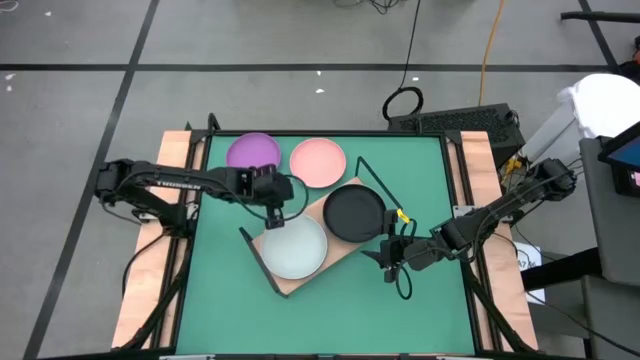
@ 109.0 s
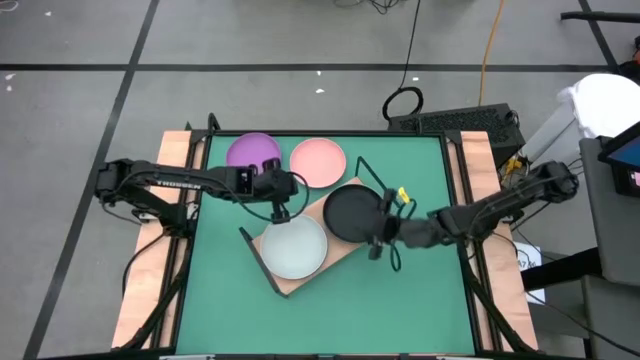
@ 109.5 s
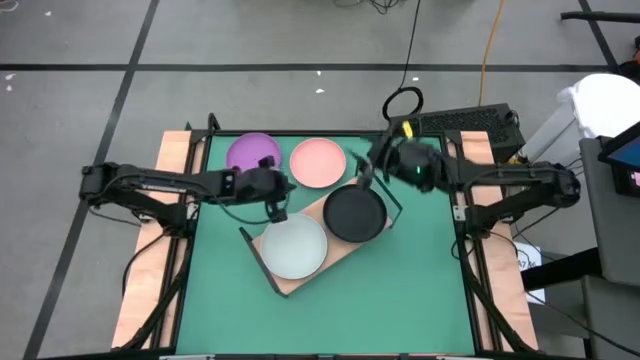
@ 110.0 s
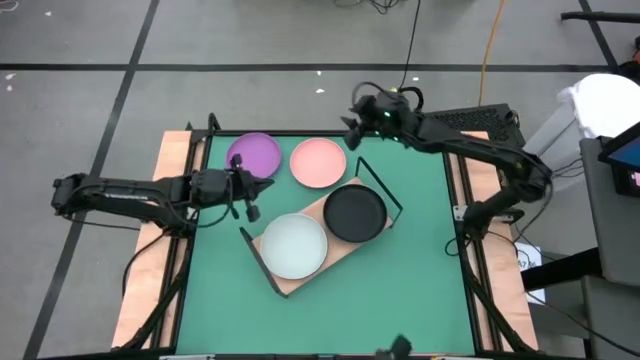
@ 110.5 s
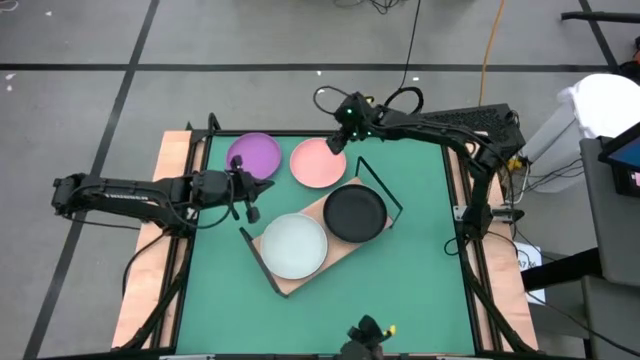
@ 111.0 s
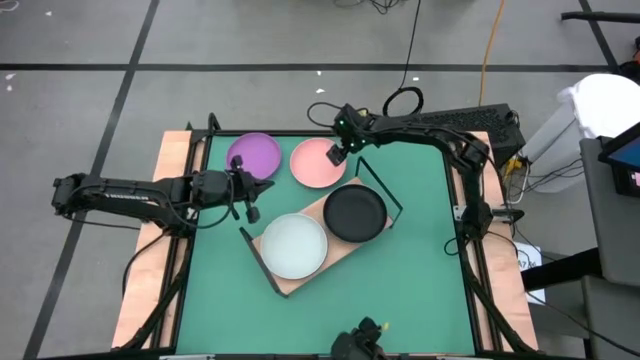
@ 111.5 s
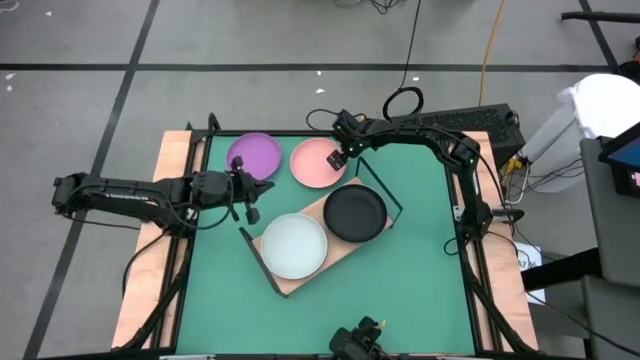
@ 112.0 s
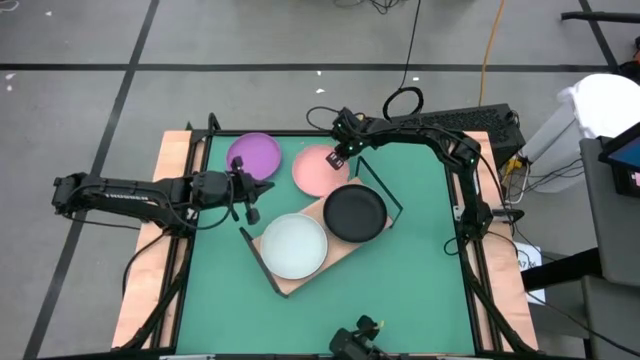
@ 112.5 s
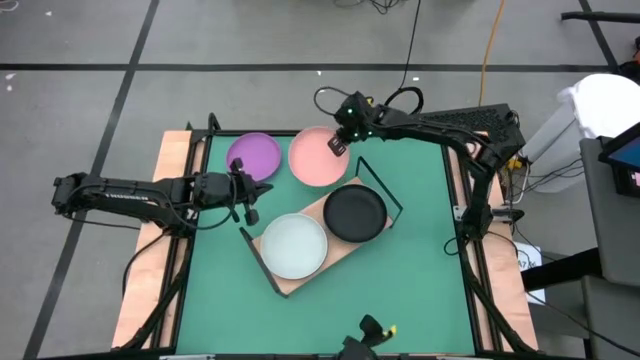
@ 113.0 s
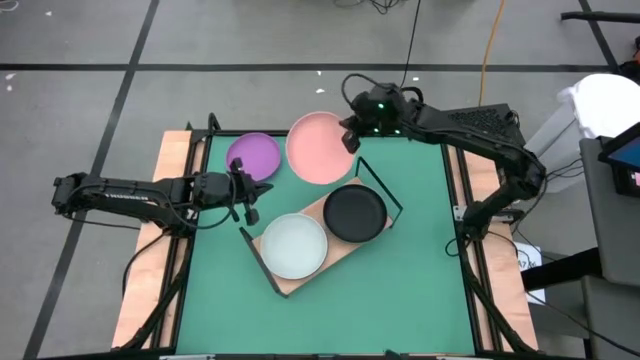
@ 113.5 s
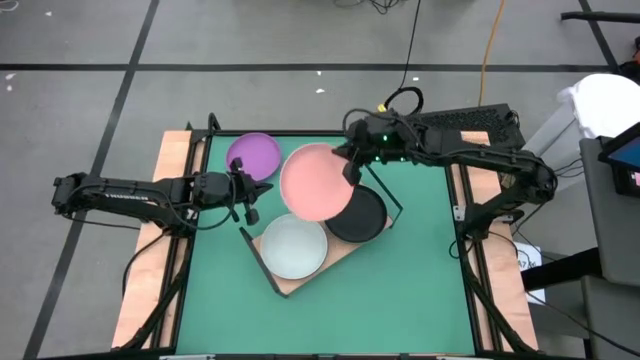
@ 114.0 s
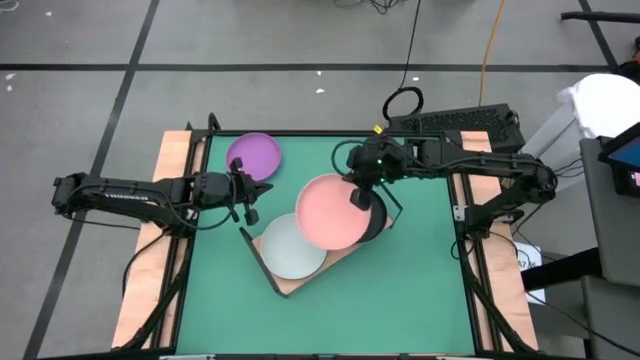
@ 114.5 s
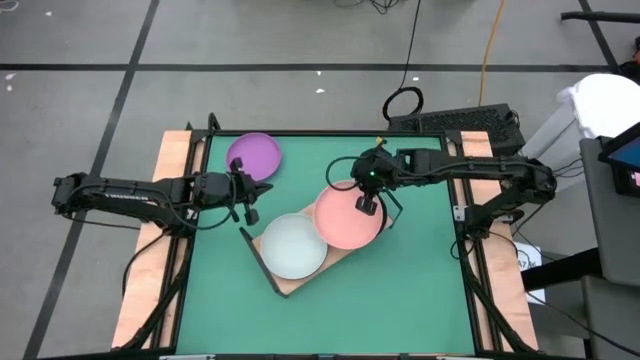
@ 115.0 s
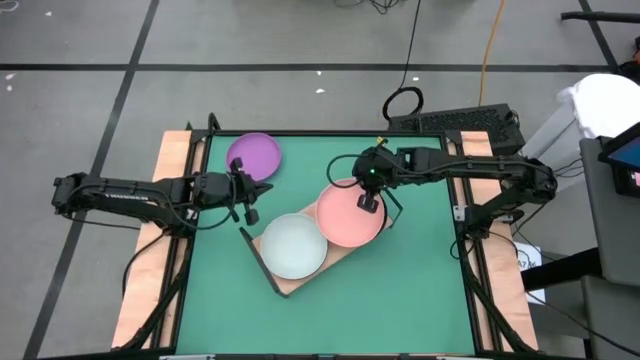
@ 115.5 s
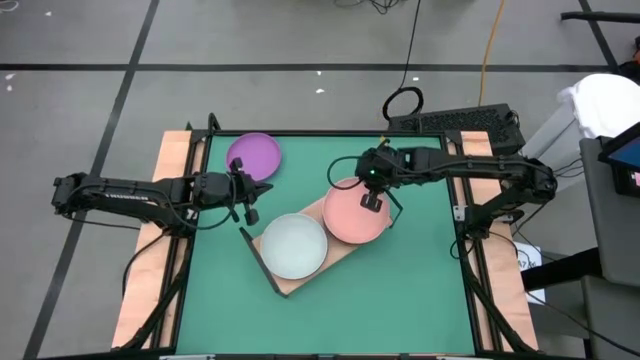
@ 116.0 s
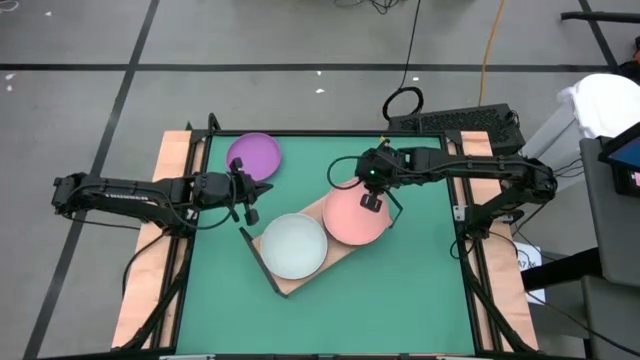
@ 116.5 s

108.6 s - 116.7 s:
Task: Place and stack plates onto a shelf
Stack the orange plate on top of the black plate on the shelf

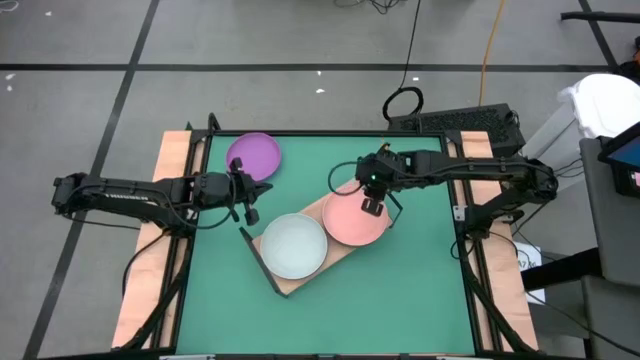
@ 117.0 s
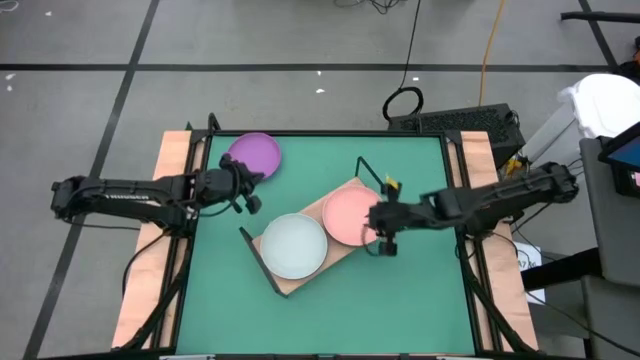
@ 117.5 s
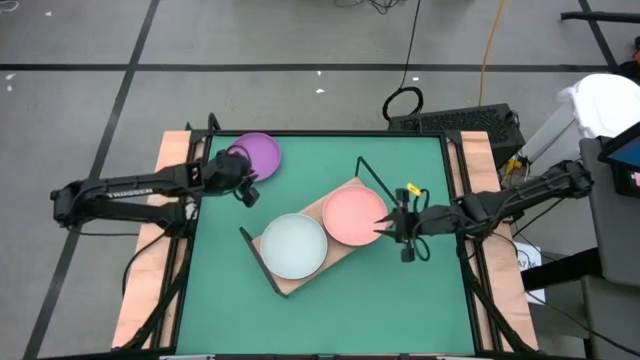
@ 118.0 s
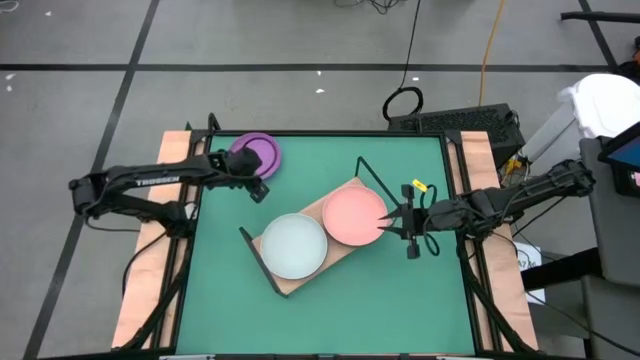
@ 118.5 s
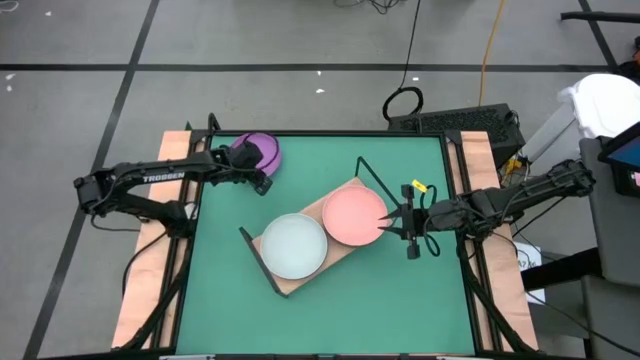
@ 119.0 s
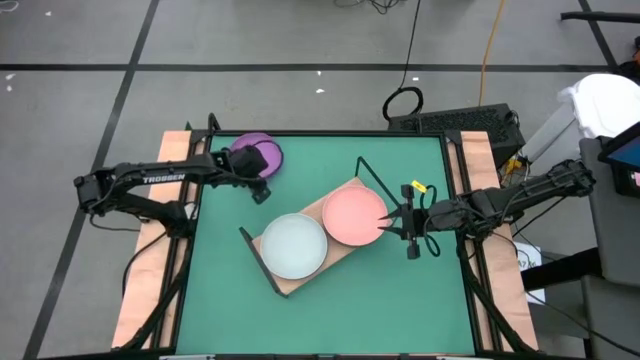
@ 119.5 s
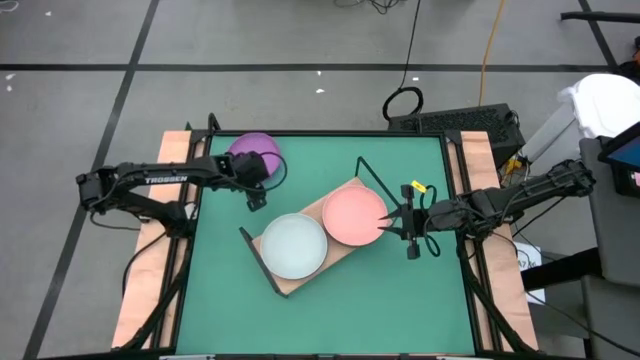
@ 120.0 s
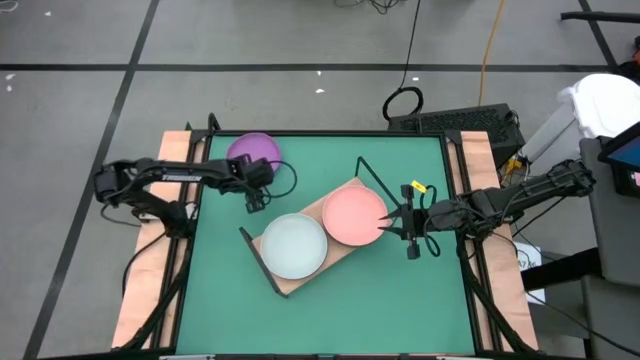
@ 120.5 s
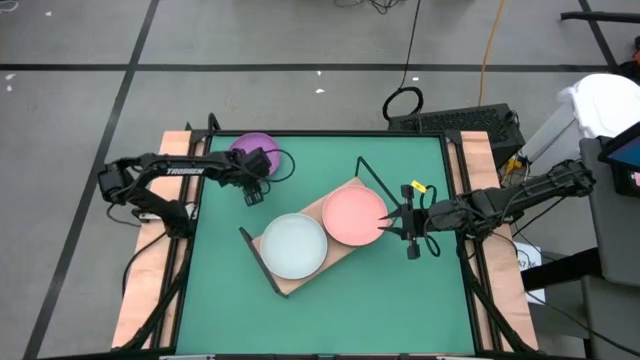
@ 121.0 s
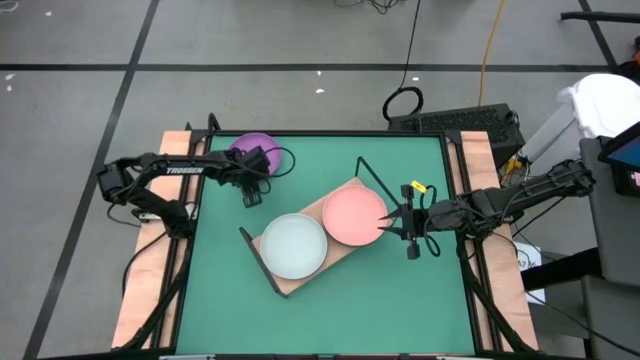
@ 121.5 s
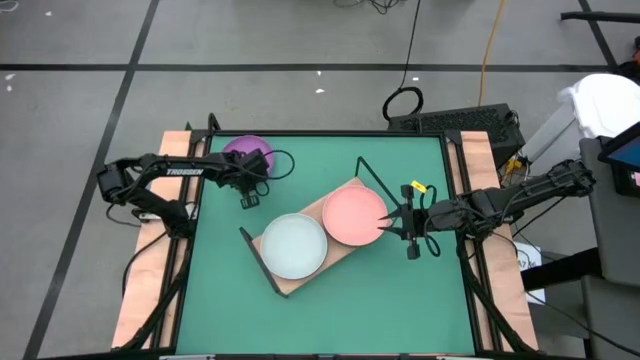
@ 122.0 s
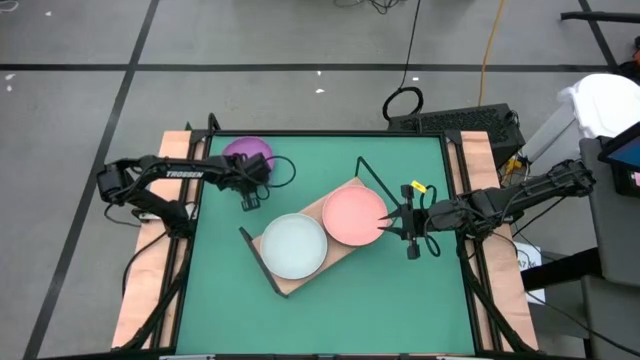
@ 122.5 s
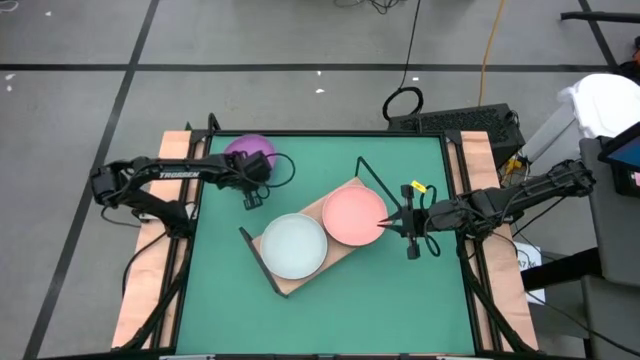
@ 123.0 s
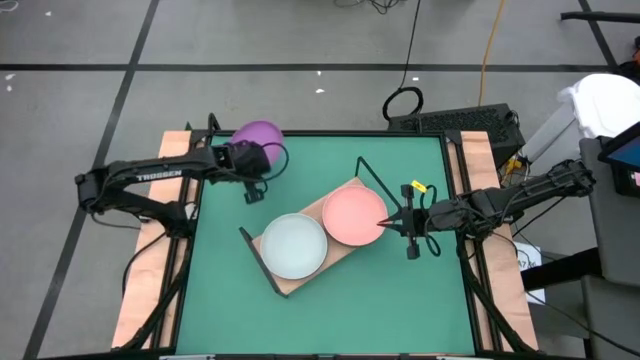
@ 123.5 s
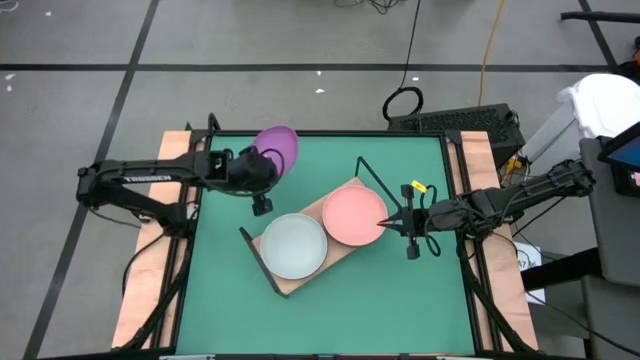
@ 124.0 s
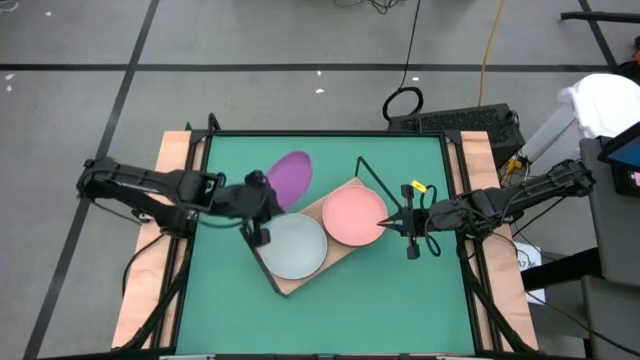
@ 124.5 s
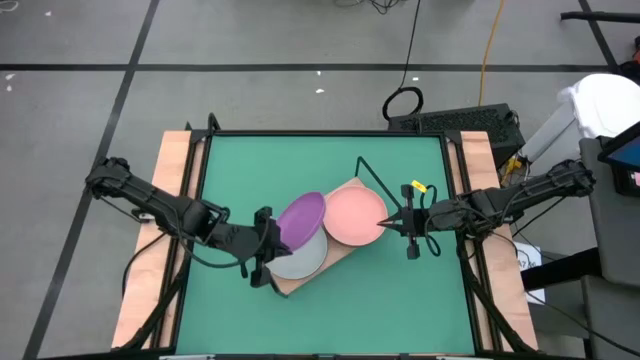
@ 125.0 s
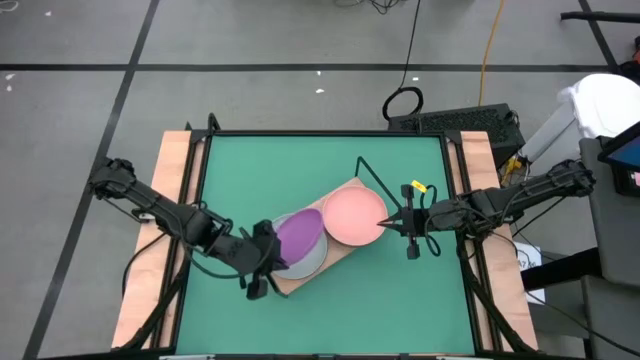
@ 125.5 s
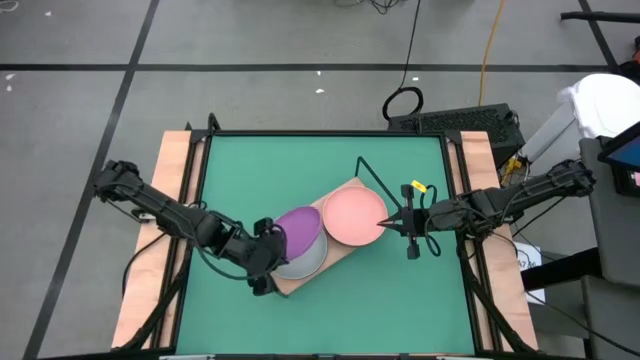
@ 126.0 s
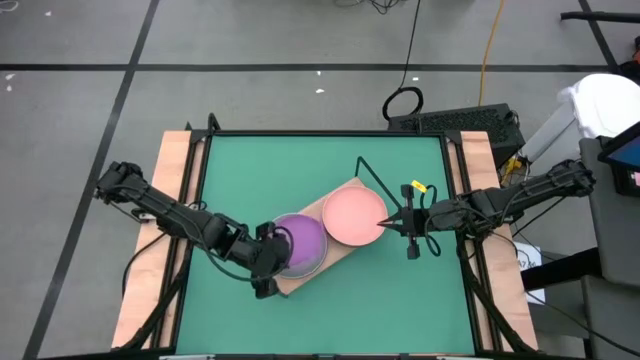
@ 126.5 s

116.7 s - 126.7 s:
Stack the violet plate on top of the gray plate on the shelf
